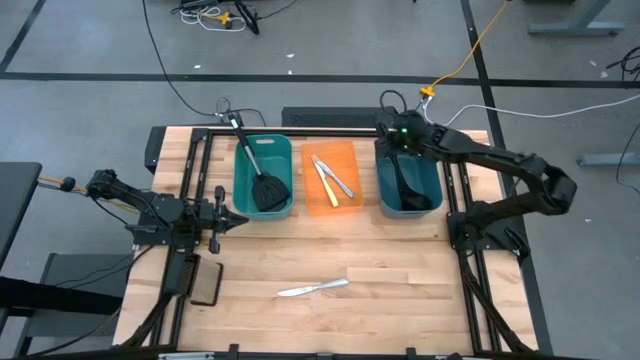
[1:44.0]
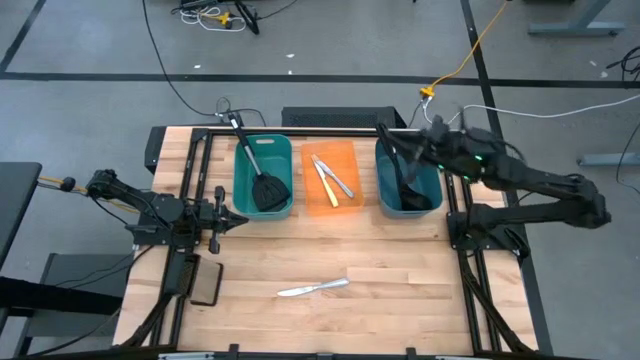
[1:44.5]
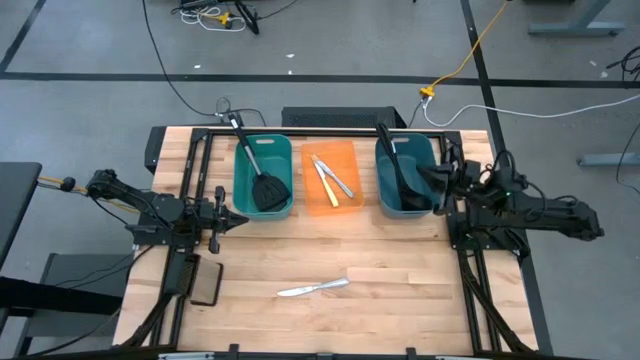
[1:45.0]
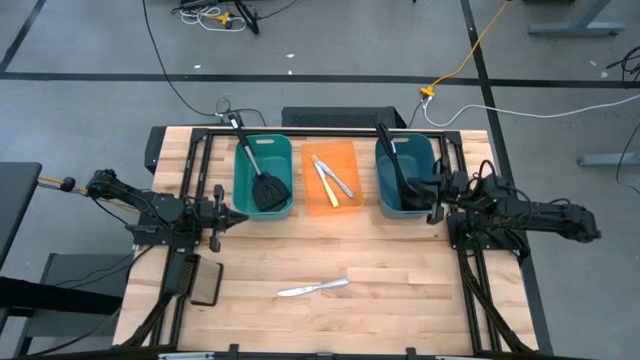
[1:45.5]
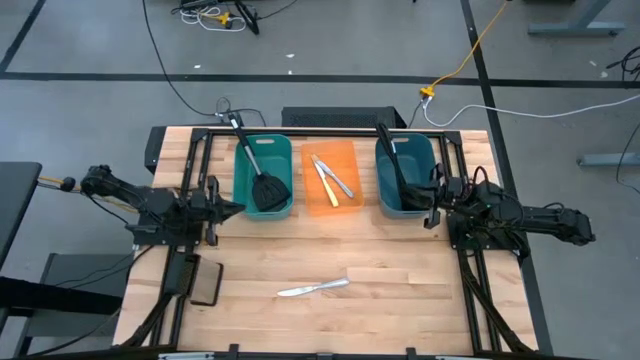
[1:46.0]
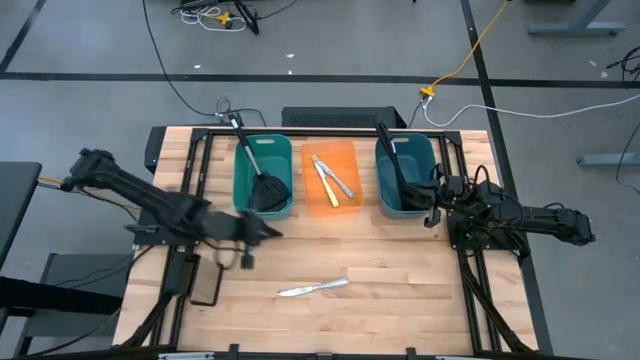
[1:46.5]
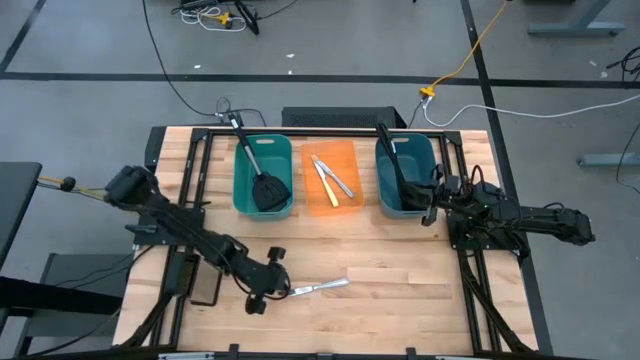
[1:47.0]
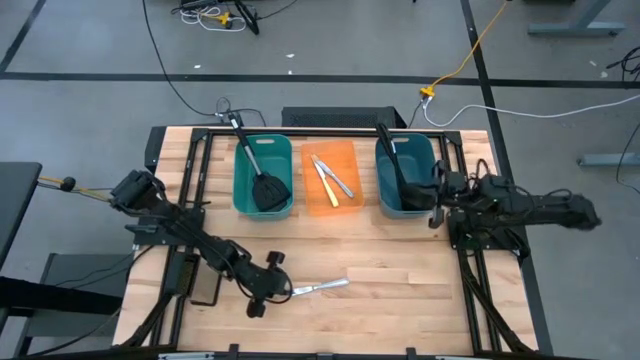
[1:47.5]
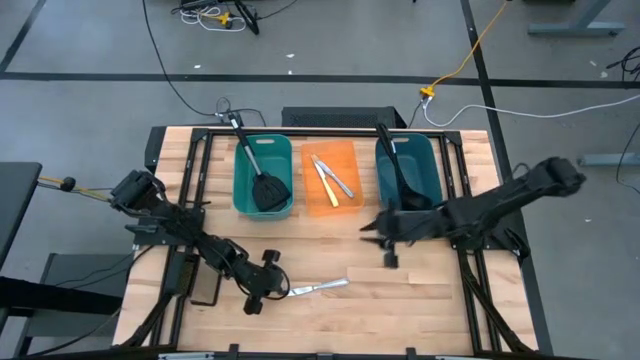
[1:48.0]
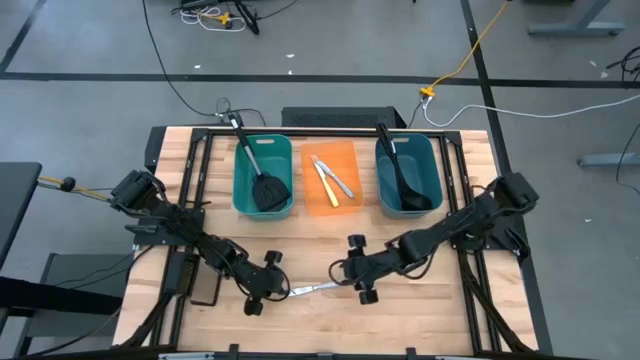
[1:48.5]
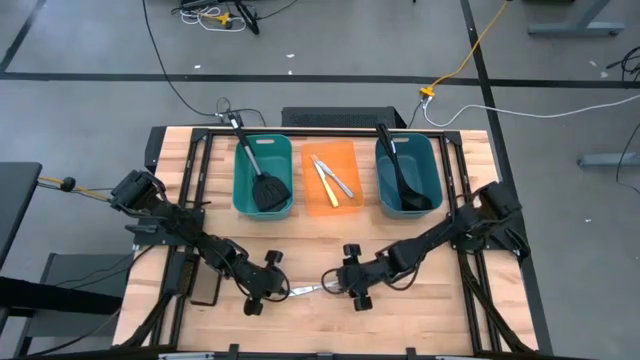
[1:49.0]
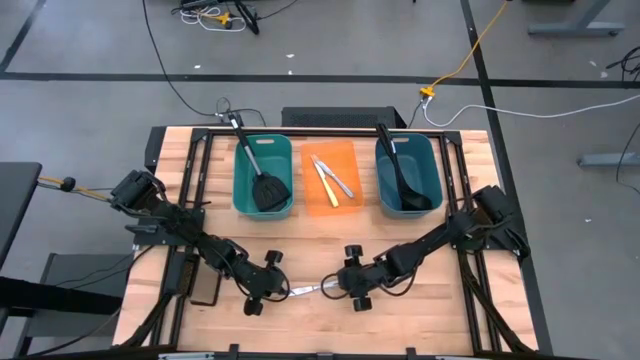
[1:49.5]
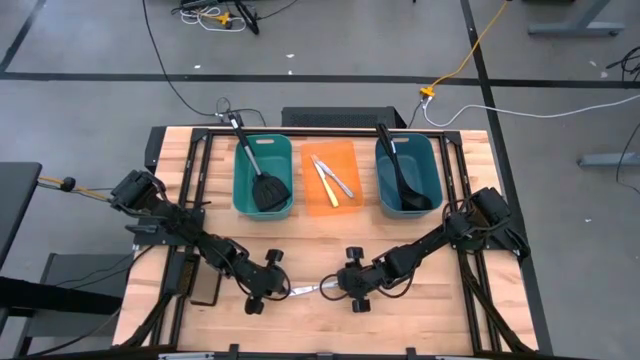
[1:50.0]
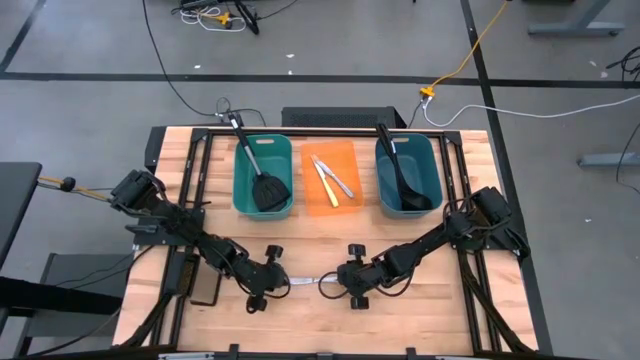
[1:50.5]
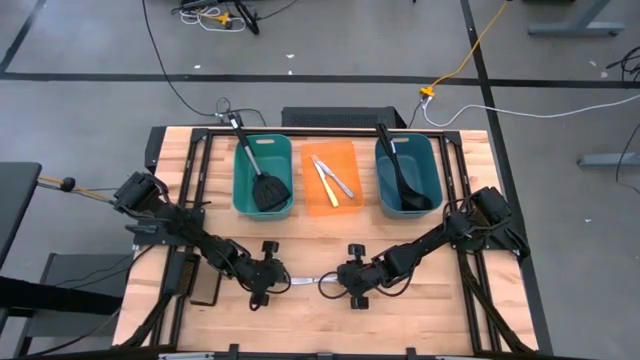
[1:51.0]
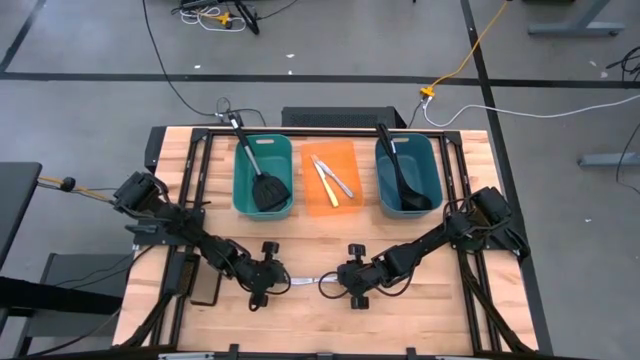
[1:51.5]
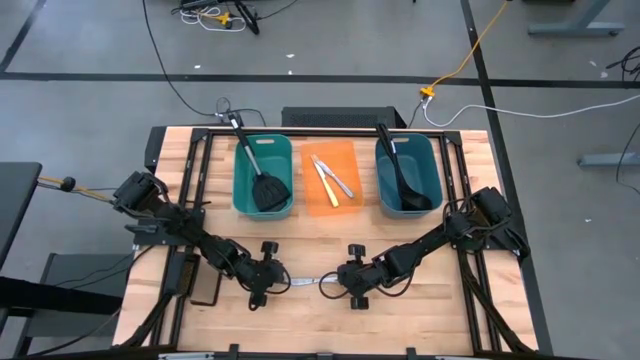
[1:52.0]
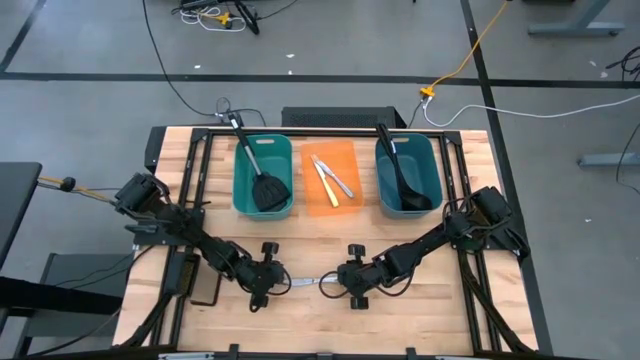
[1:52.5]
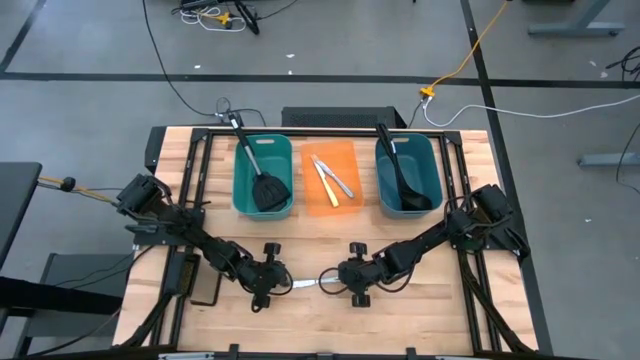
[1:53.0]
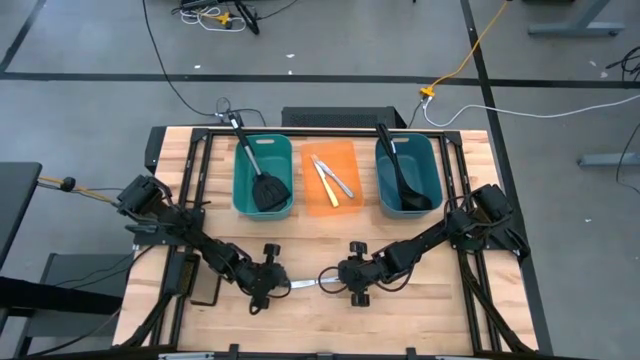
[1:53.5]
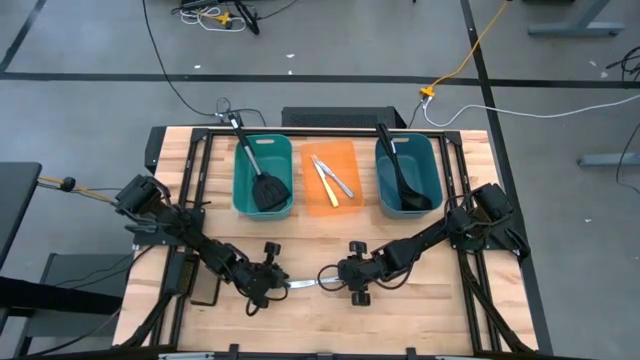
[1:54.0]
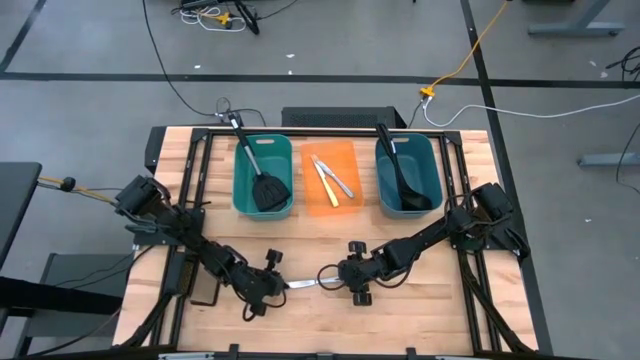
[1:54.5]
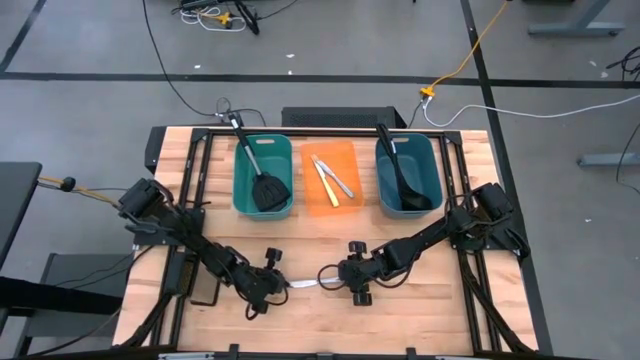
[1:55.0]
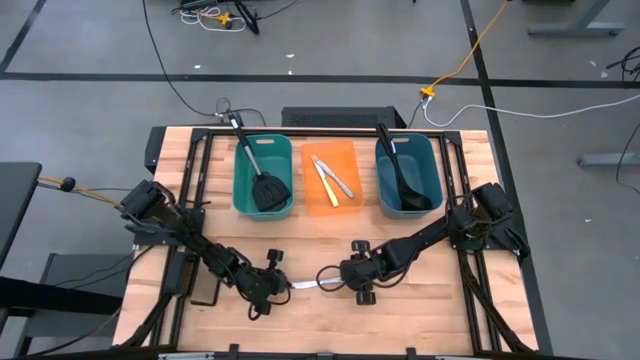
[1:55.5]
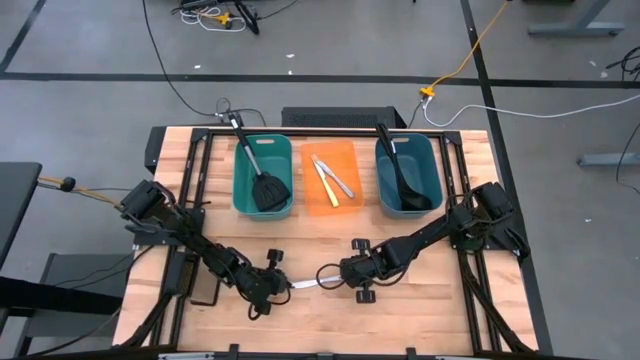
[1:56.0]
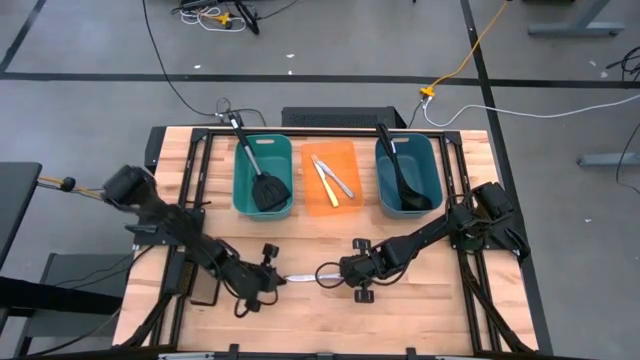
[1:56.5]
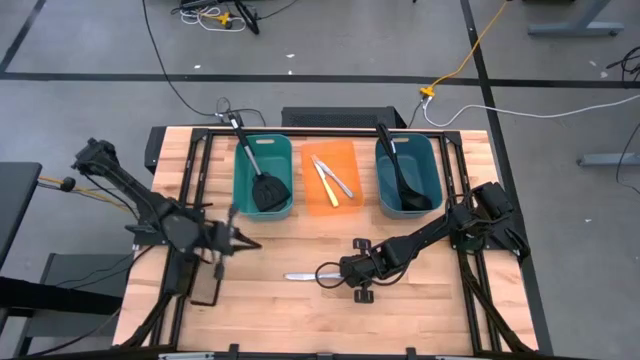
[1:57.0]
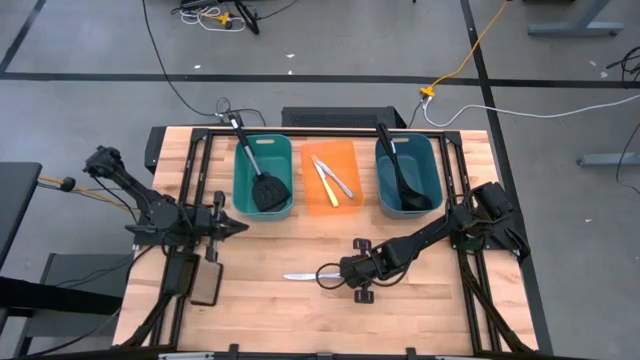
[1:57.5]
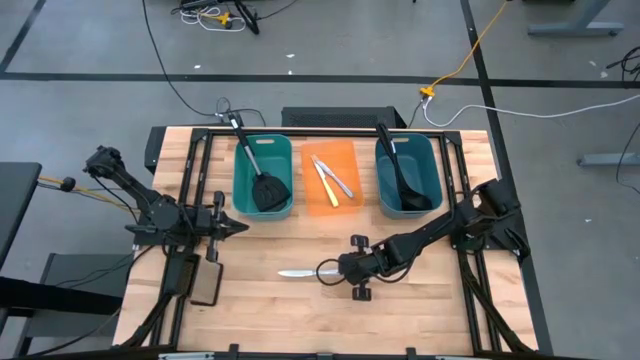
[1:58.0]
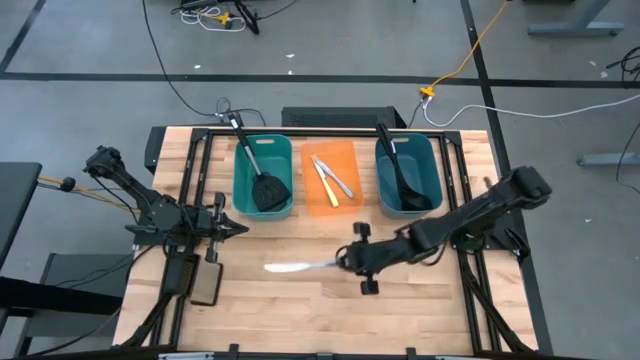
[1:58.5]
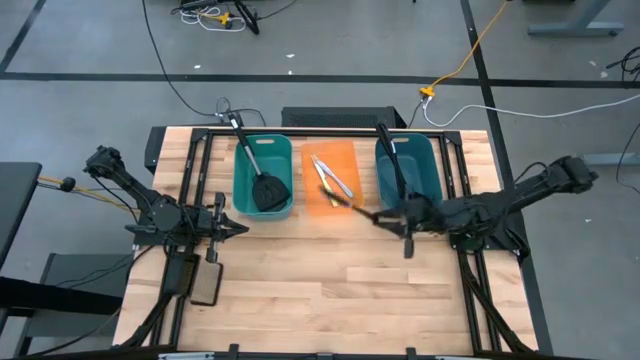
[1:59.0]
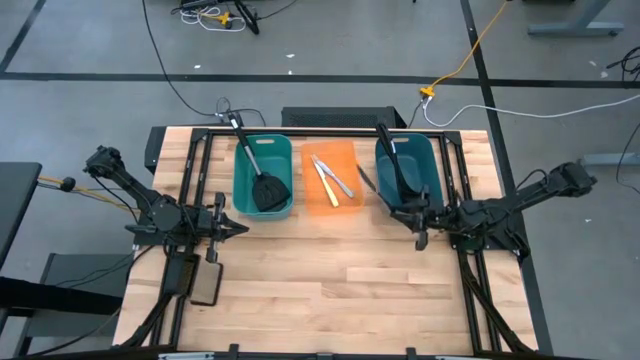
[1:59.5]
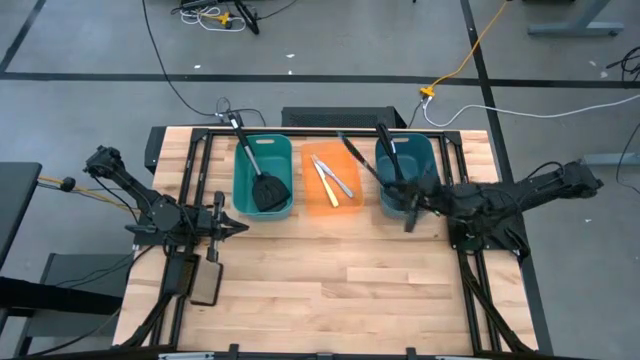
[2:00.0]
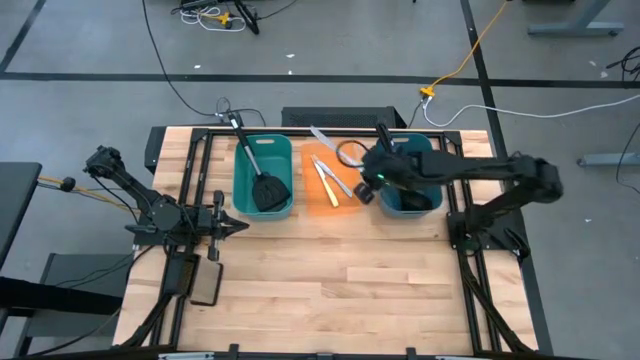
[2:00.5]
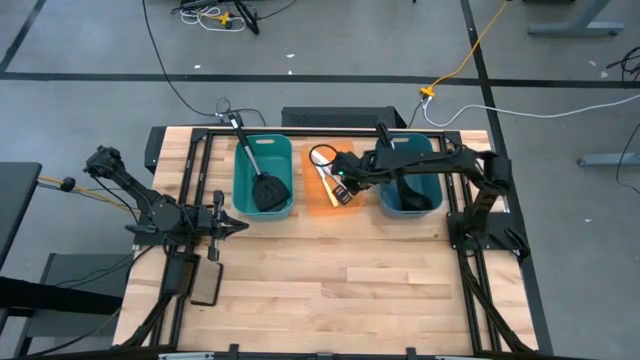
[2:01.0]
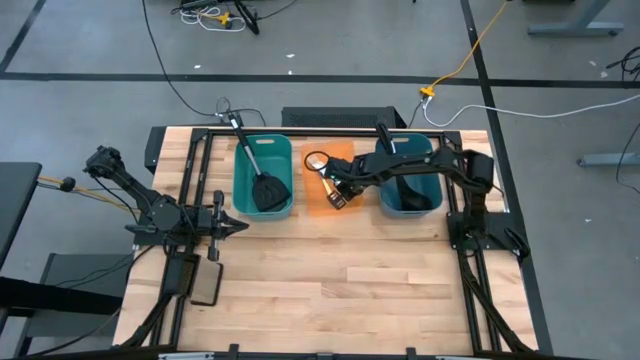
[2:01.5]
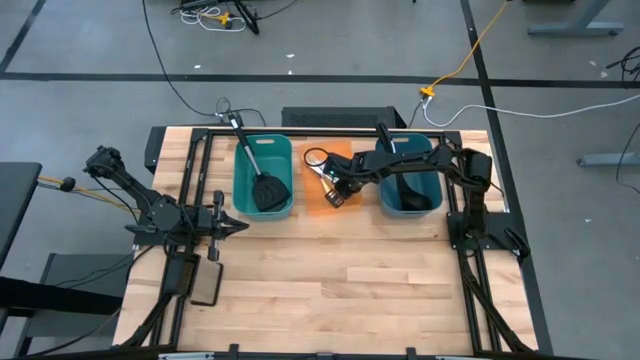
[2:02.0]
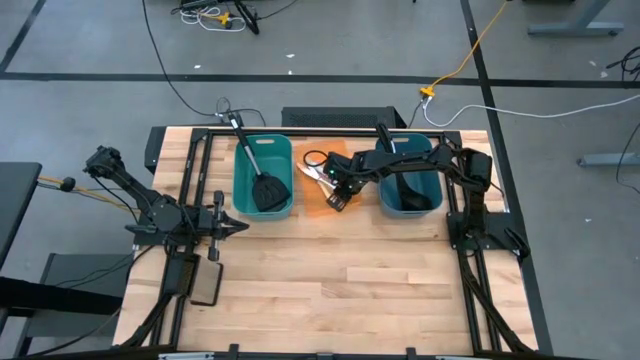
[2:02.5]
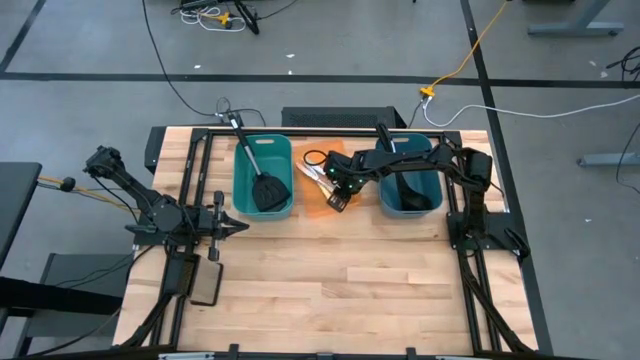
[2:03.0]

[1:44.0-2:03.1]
Task: Pick & Place Kitchen Items
Put the silver knife into the orange bin

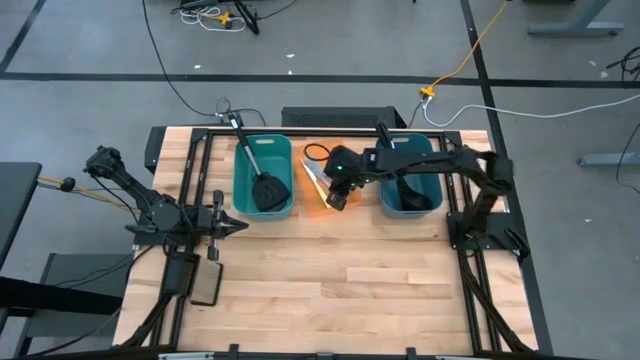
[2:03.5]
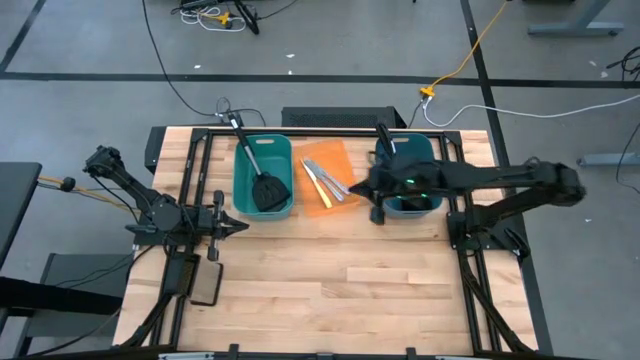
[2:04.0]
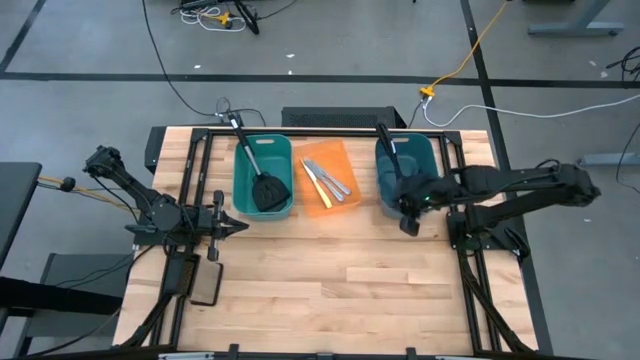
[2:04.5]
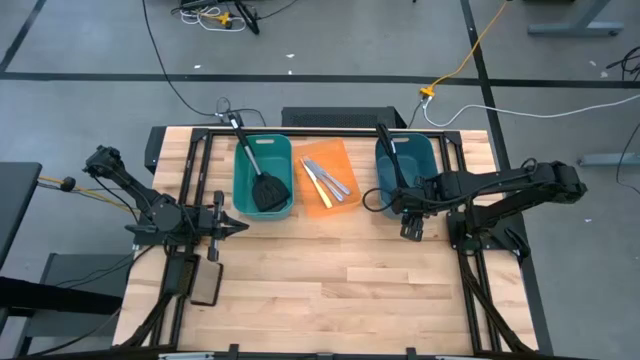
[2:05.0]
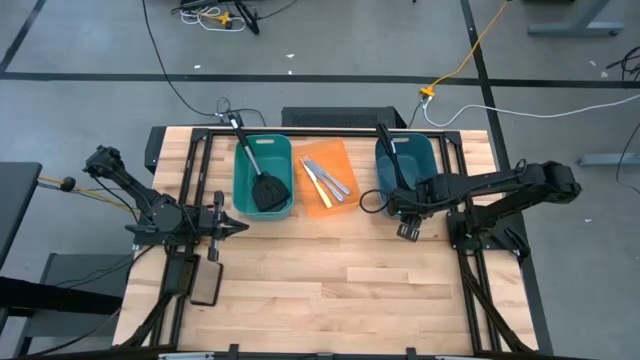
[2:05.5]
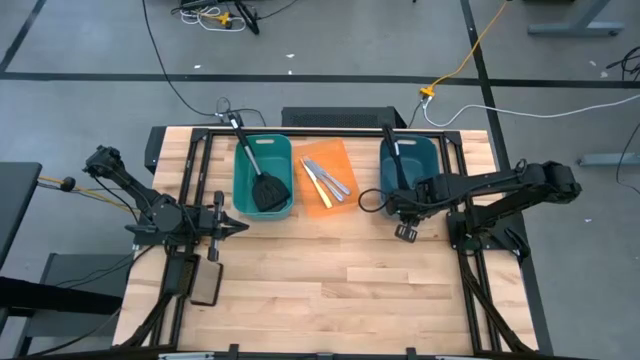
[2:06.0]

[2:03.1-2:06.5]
Adjust the dark green bin
